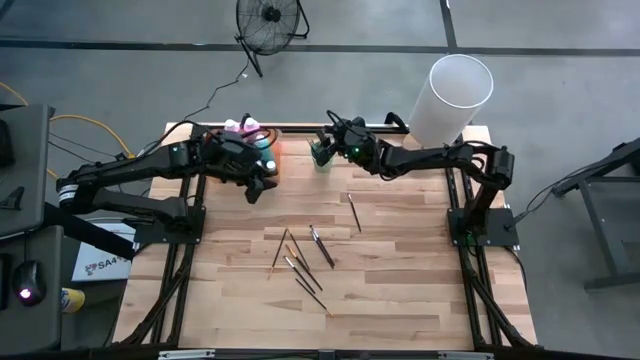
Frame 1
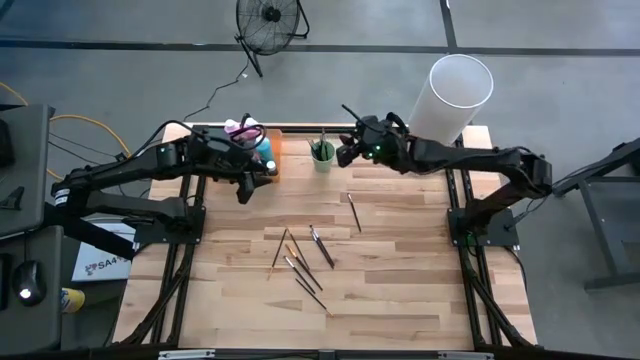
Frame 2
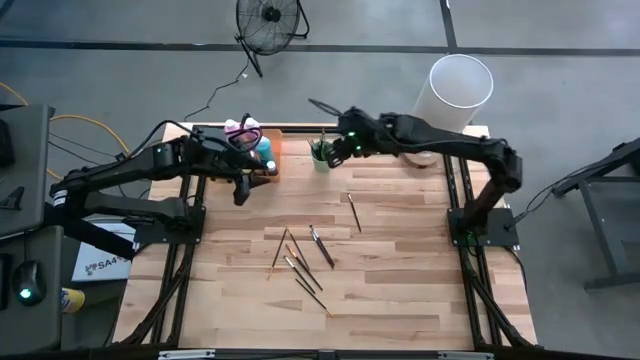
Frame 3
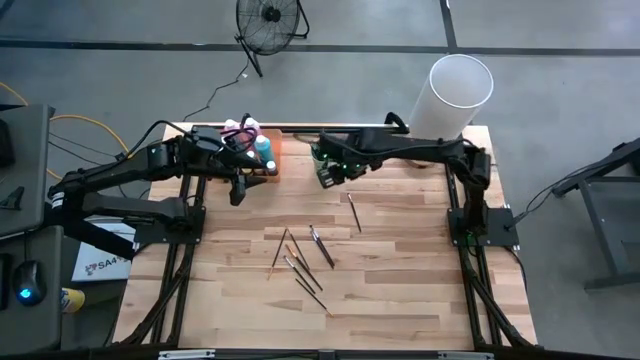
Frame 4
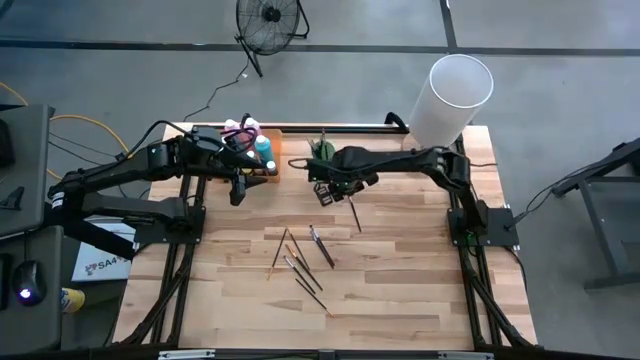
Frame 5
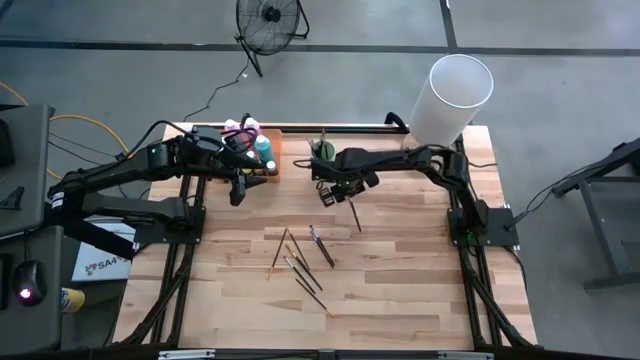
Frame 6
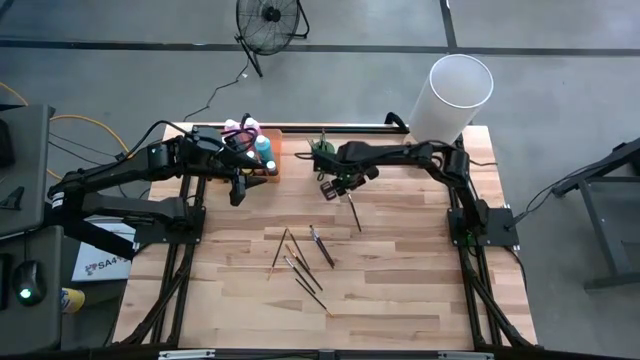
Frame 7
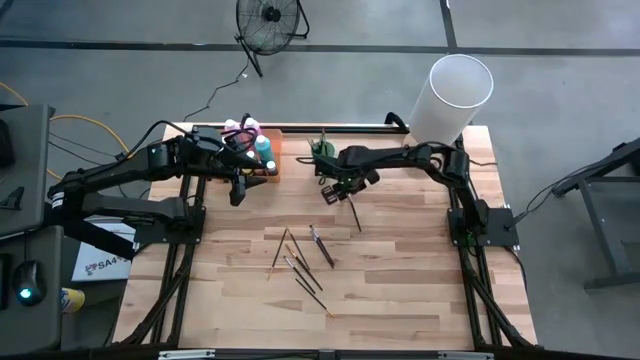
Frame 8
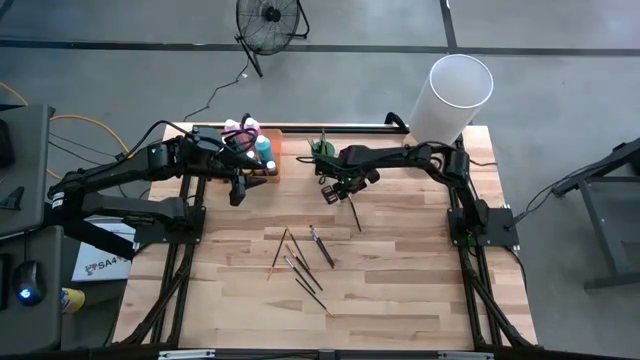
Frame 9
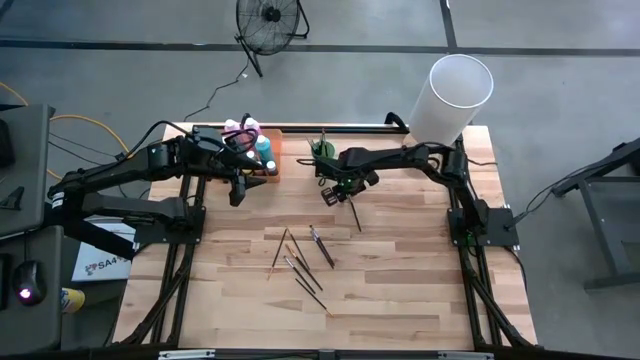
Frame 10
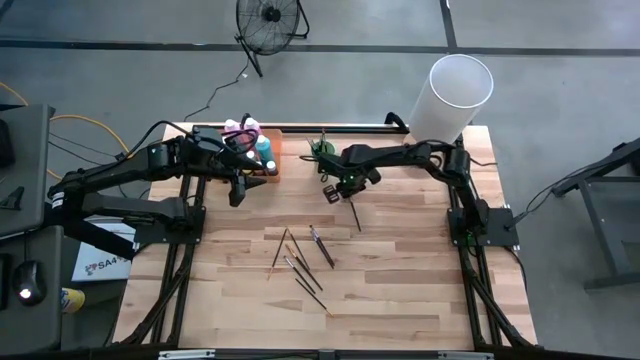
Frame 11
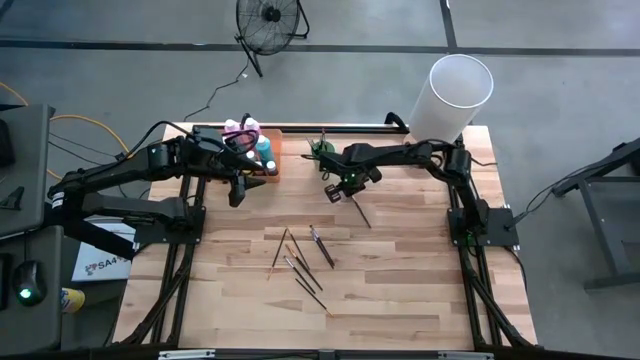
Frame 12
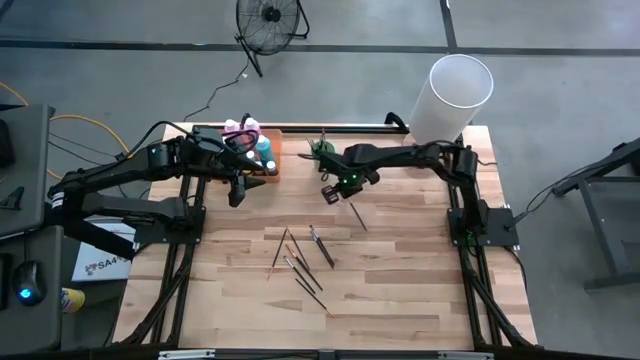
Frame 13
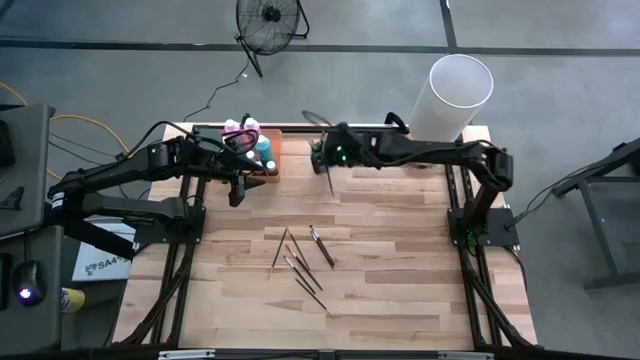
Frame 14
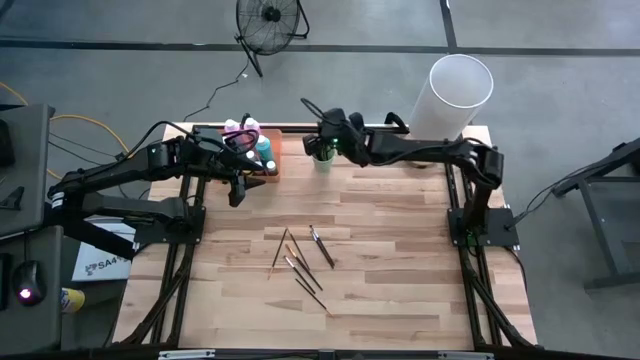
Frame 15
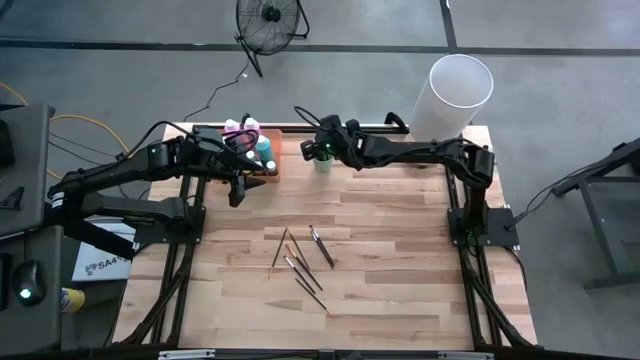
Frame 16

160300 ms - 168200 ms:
Task: Pick & Place Paint Supplies
Put the black paint brush into the green cup

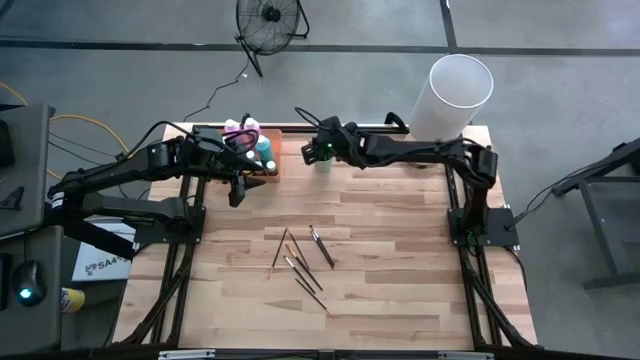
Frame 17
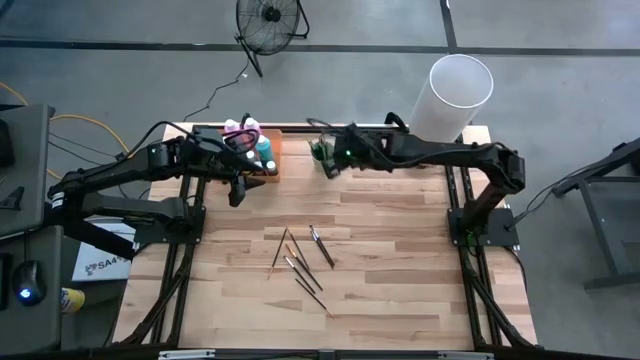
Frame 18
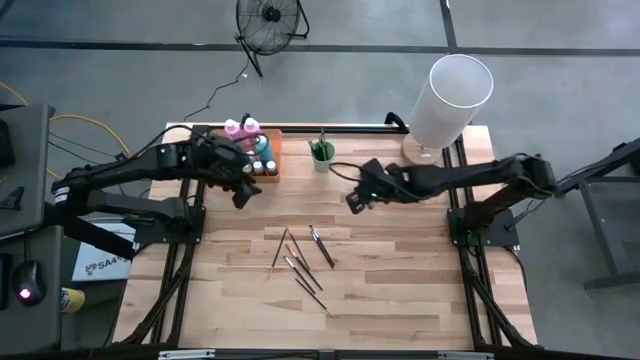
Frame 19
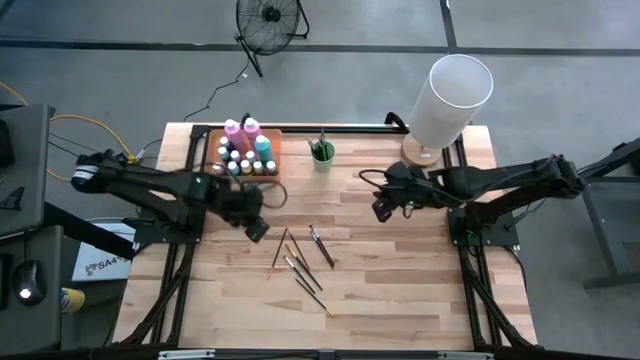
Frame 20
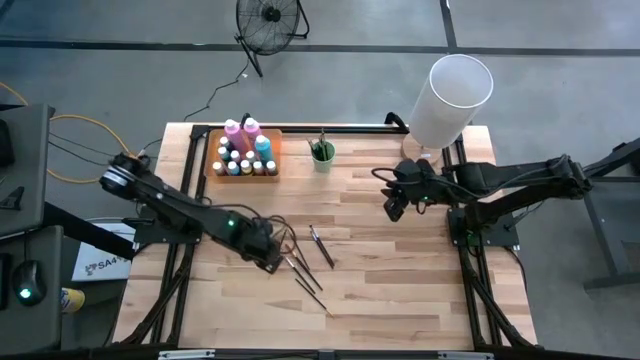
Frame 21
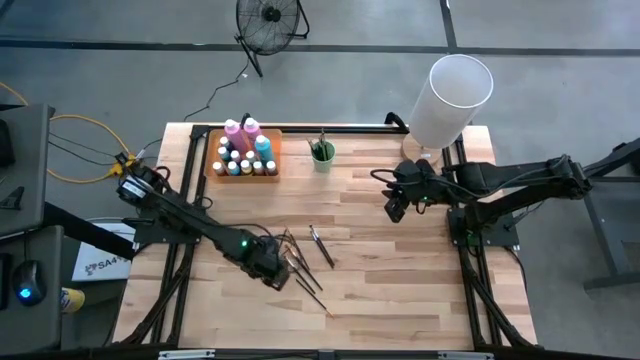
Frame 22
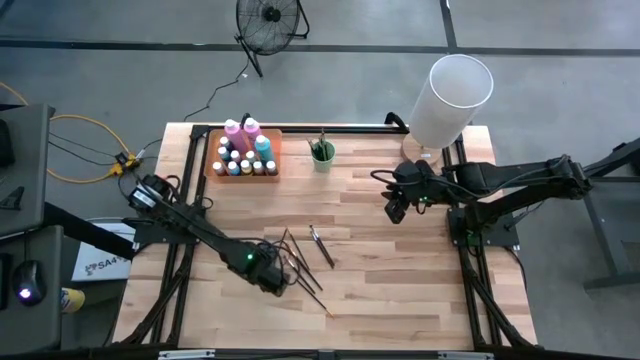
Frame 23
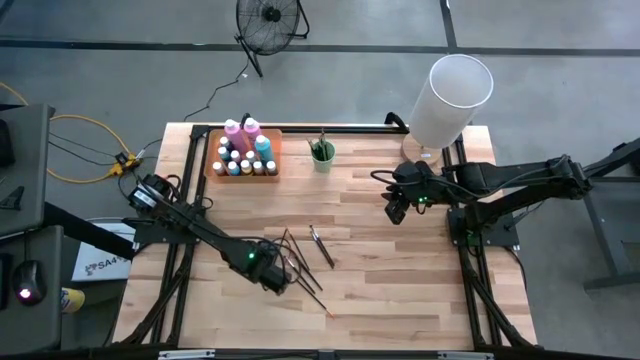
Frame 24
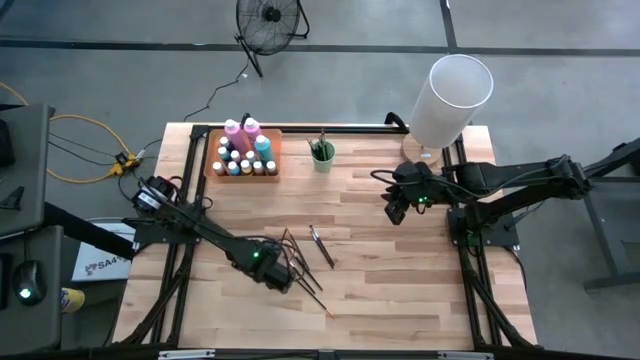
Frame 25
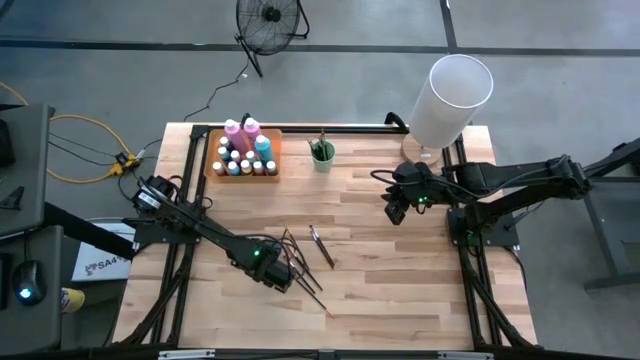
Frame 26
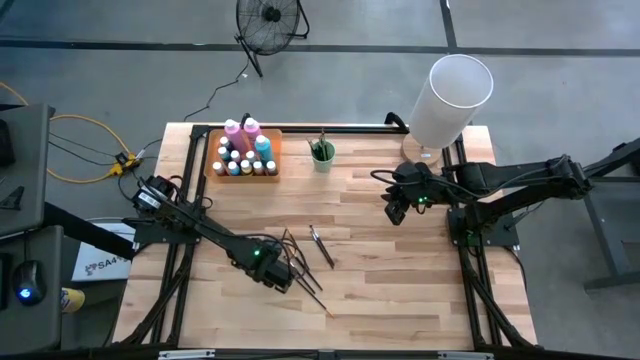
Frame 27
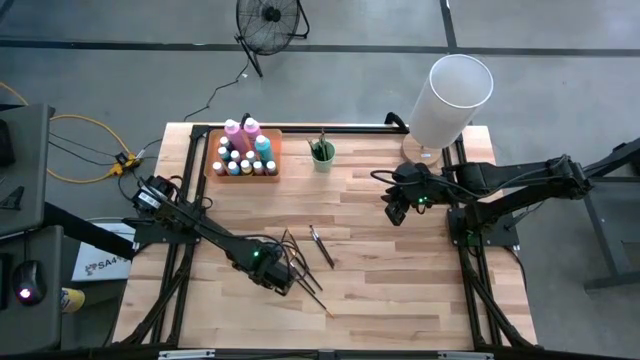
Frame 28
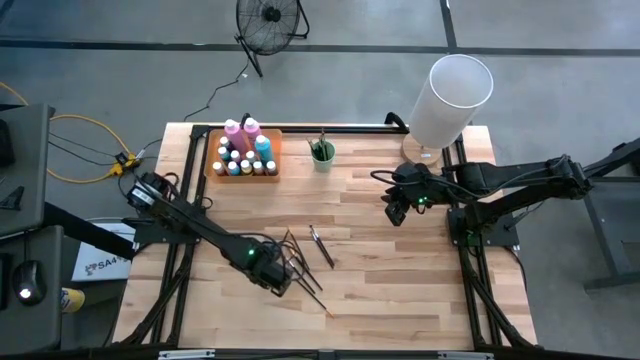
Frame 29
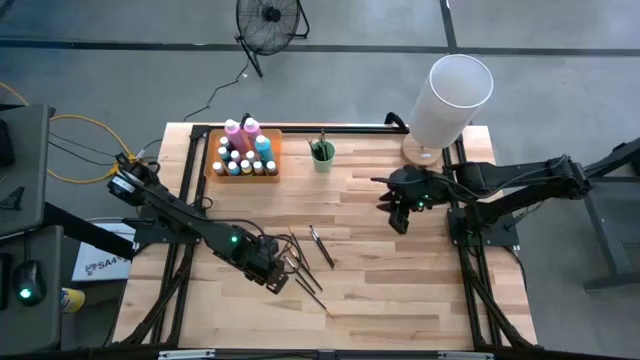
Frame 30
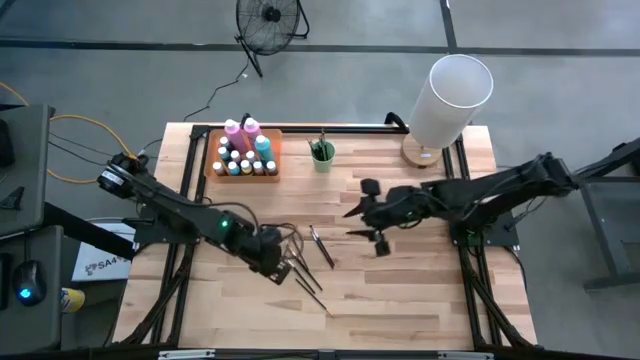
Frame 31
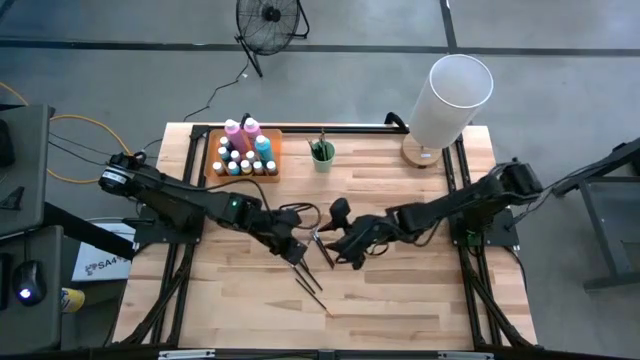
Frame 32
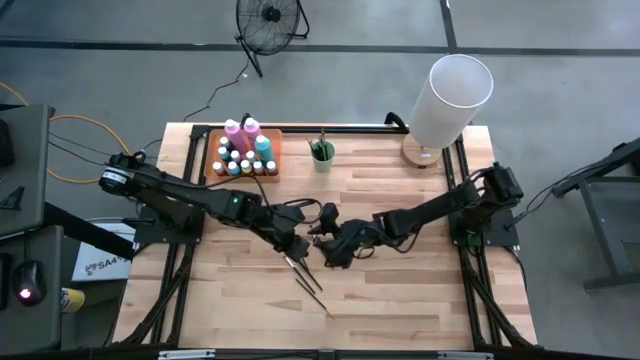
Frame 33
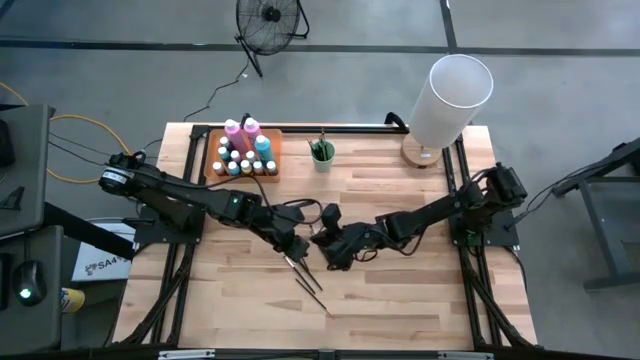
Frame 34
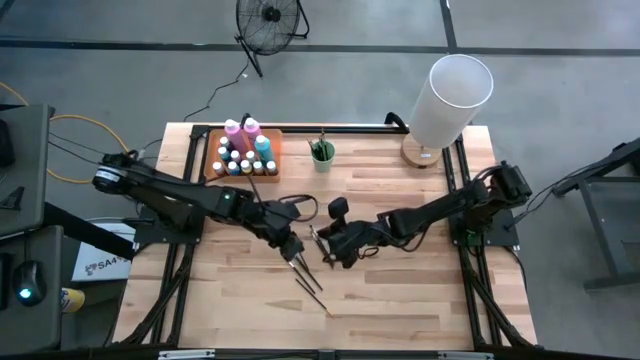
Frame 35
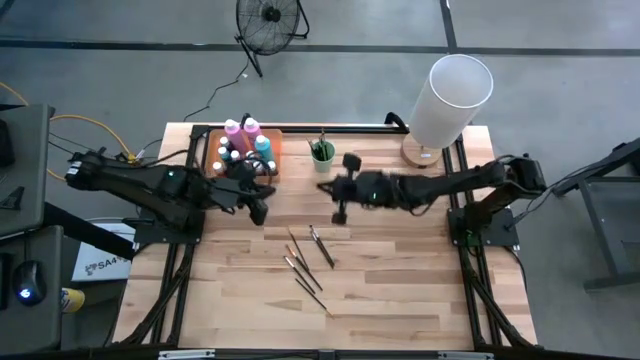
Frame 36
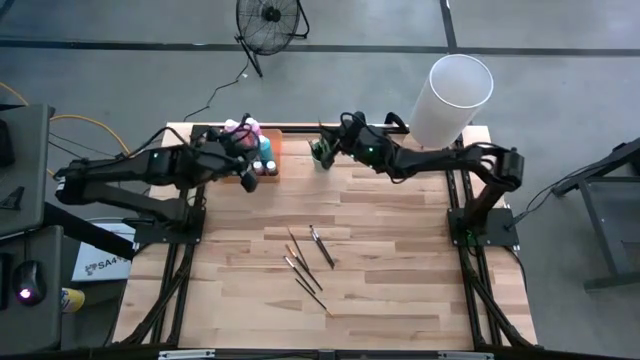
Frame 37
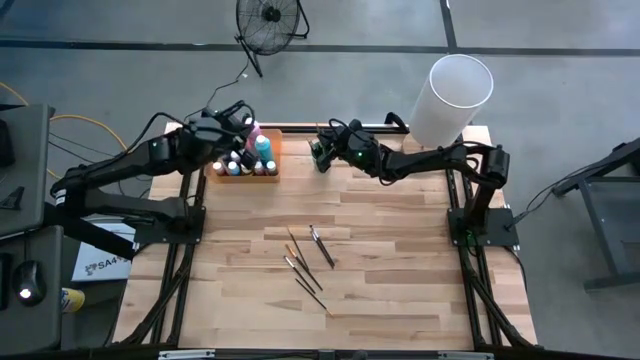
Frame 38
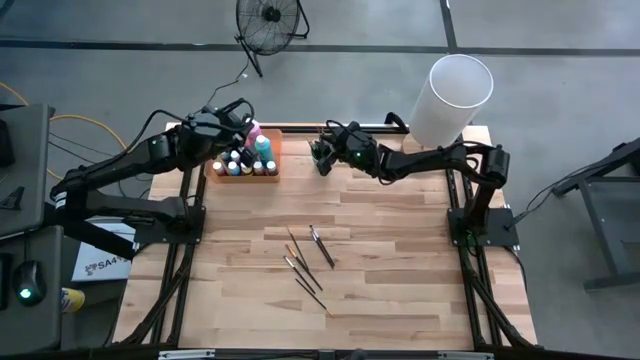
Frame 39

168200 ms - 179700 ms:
Put the black paint brush into the green cup

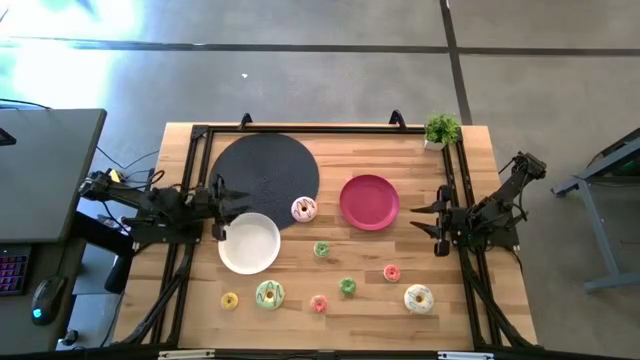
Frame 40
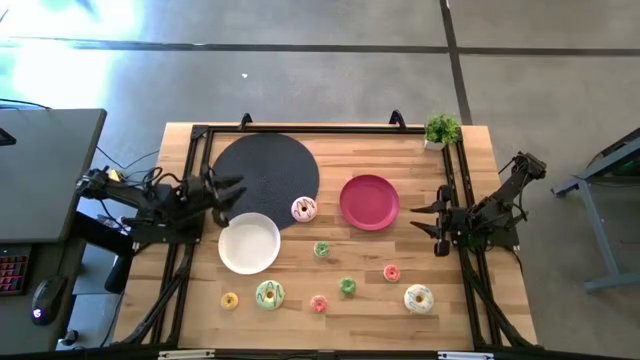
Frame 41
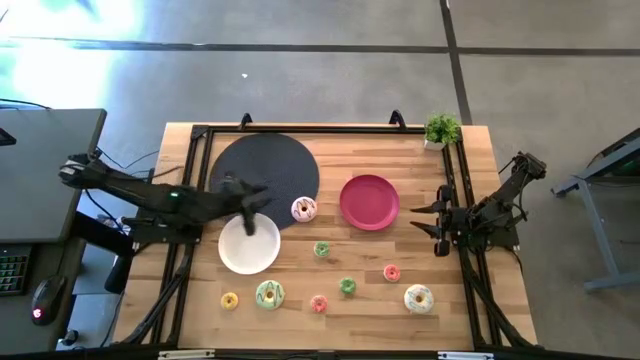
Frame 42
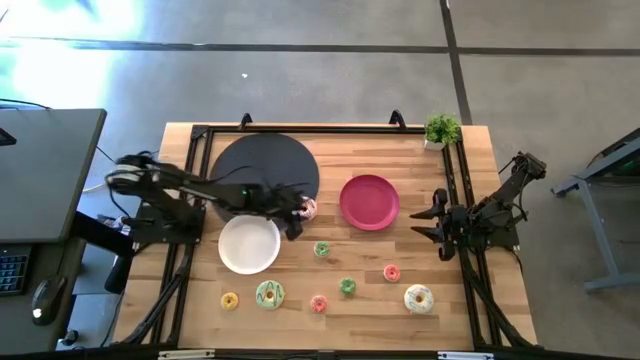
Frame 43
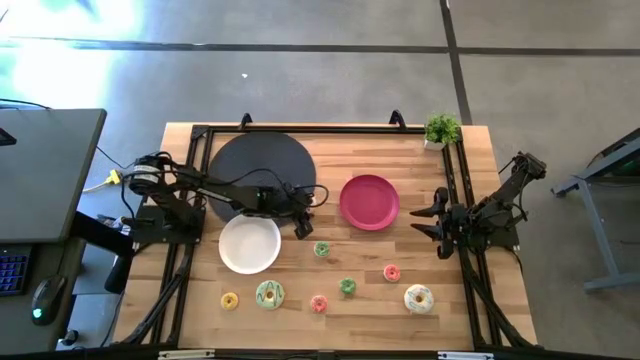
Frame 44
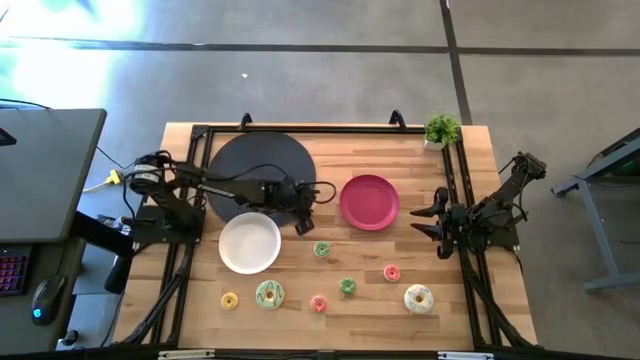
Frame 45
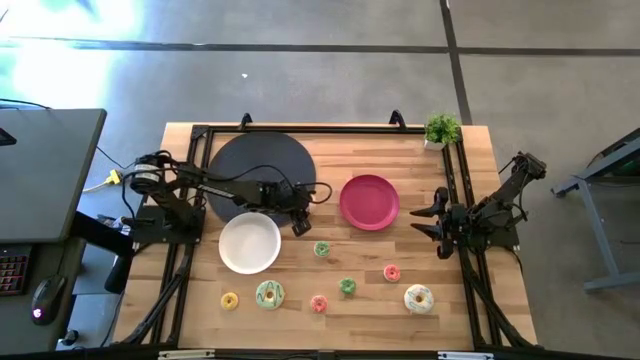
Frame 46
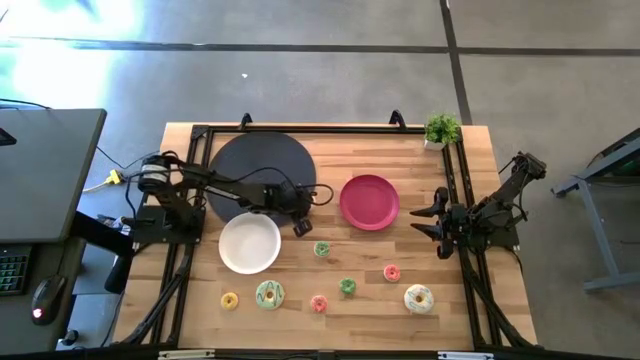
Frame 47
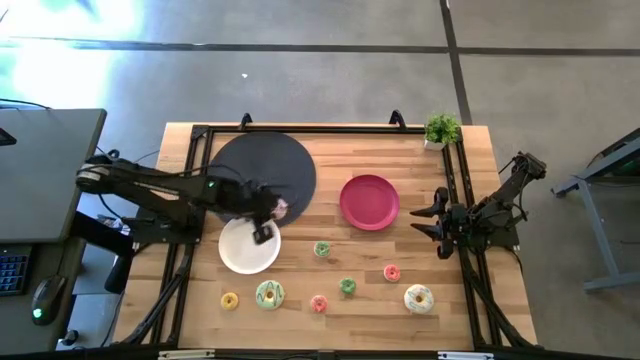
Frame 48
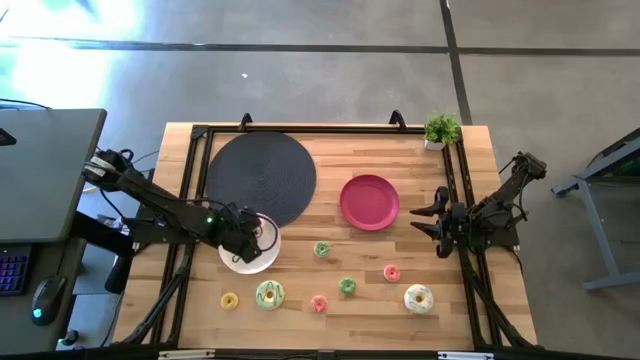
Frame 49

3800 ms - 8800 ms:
Task: Pick & Place donuts
Put the big purple donut on the white plate
